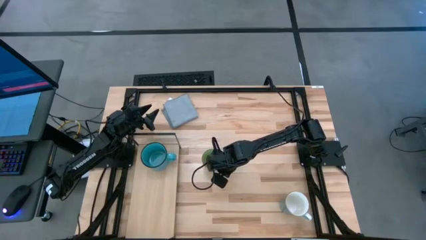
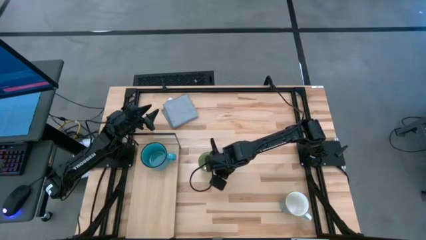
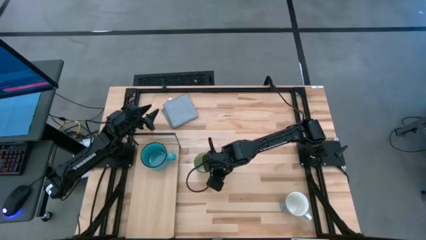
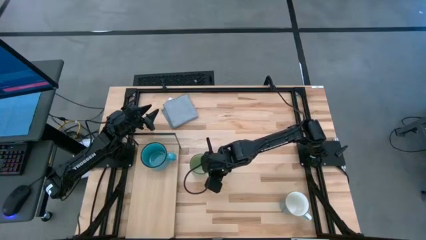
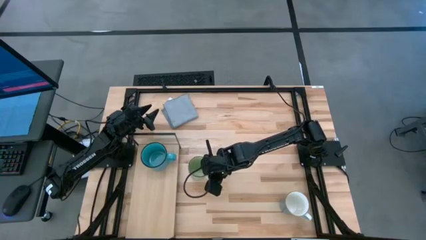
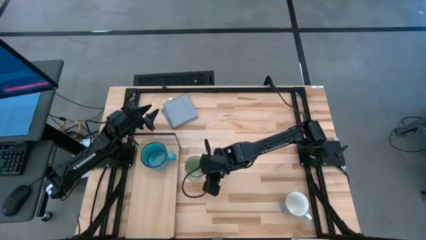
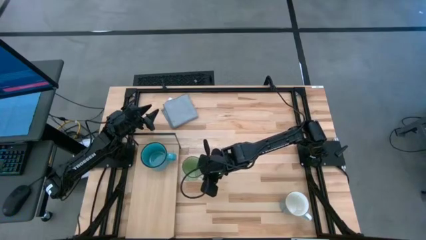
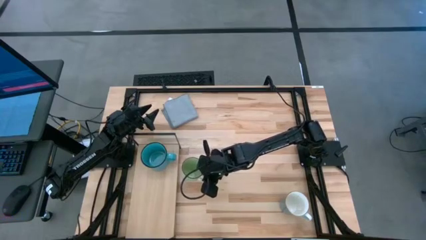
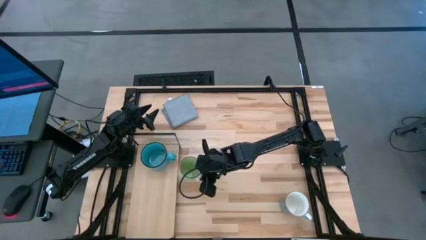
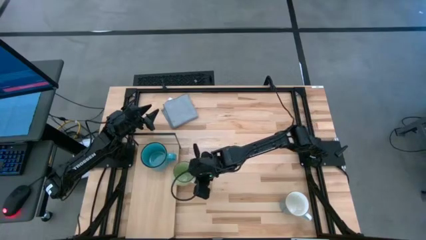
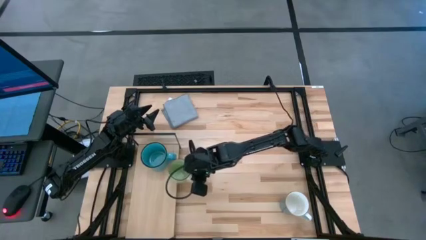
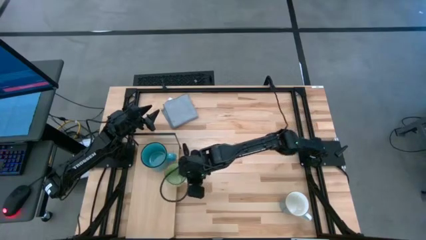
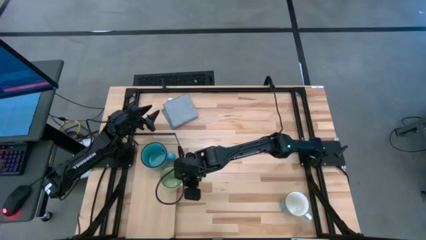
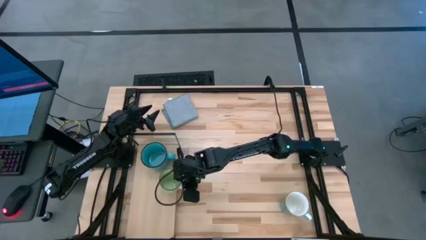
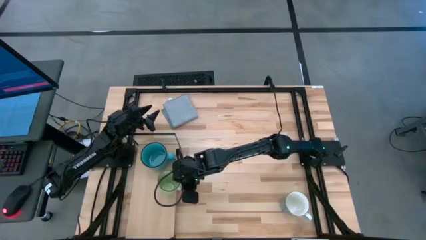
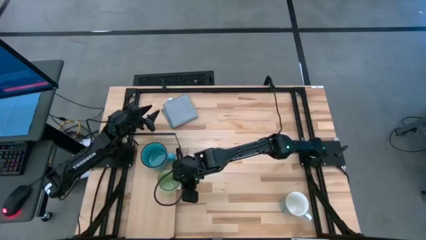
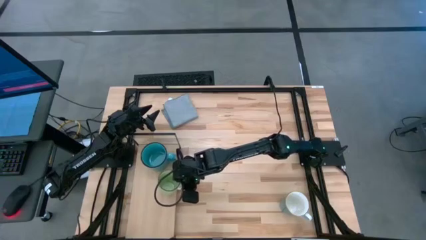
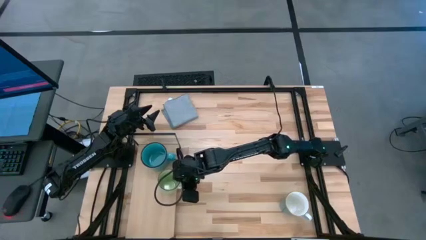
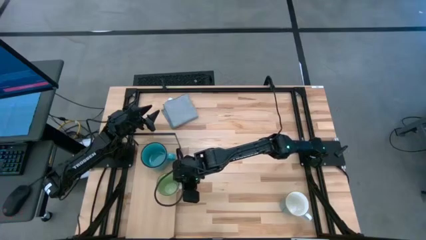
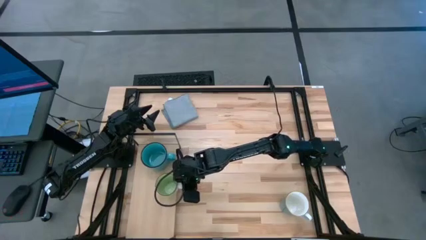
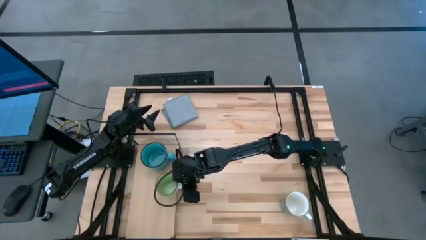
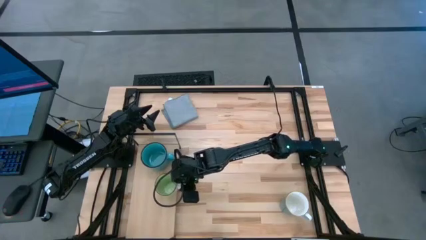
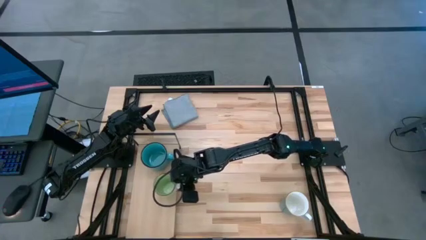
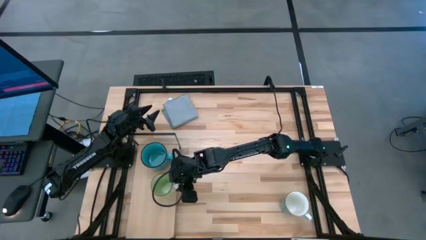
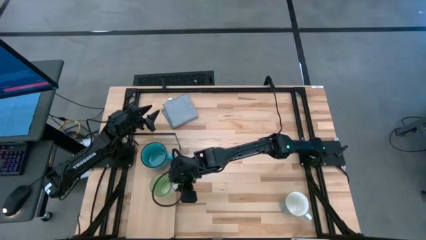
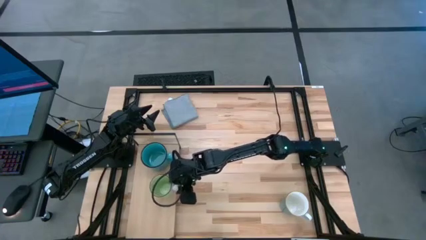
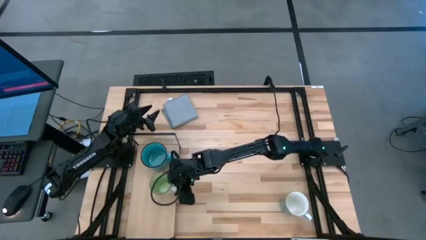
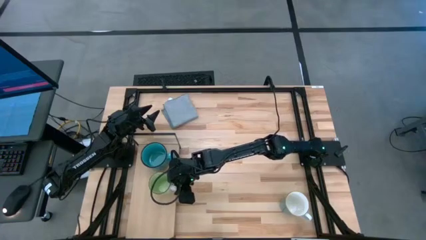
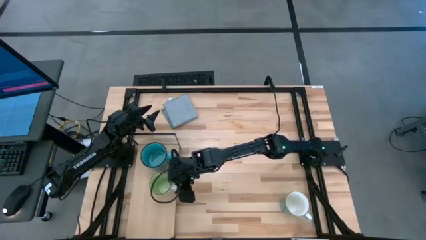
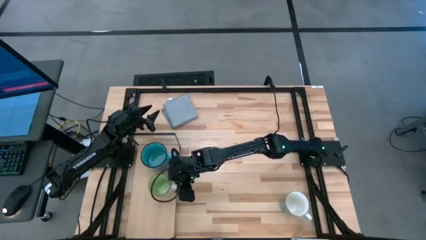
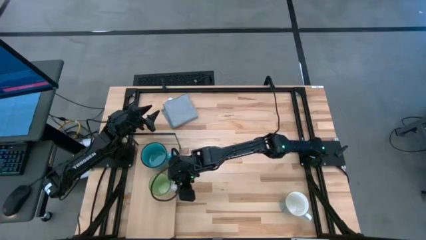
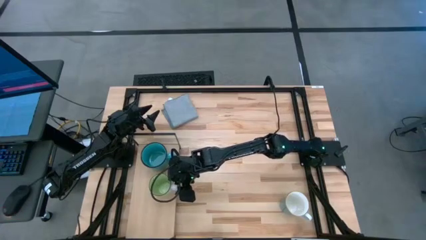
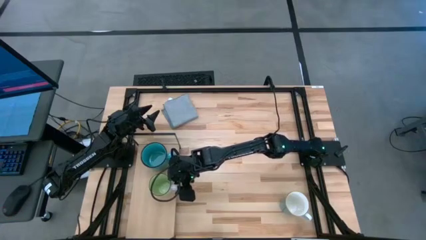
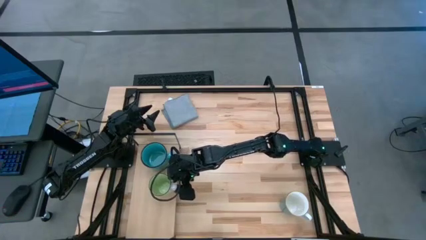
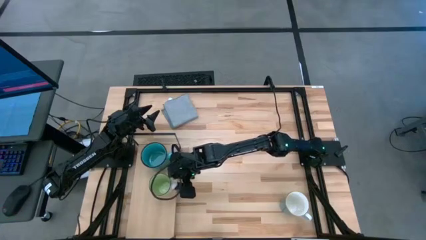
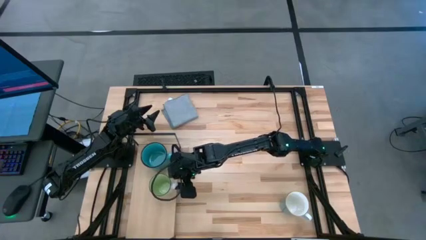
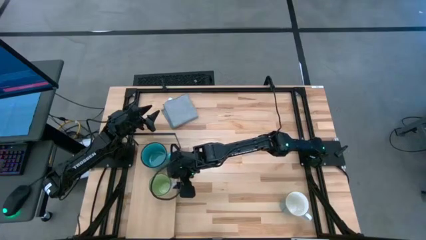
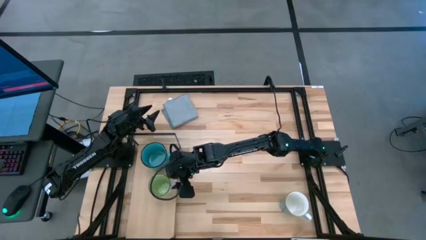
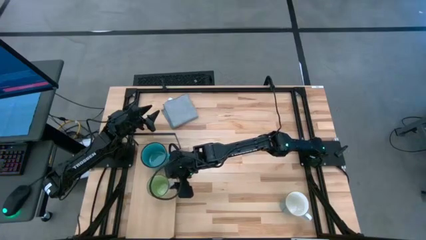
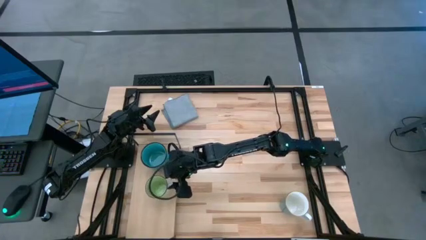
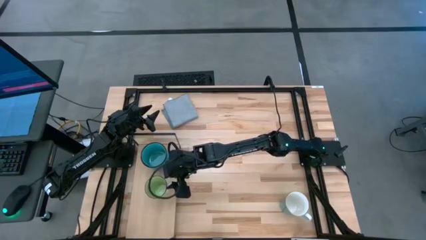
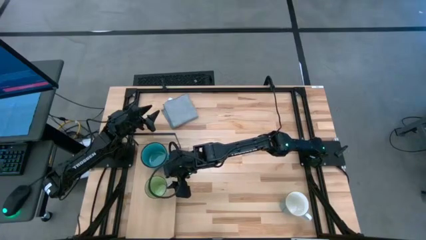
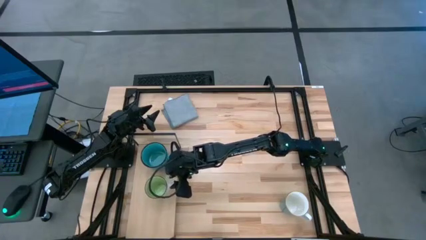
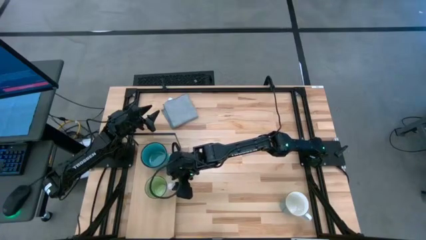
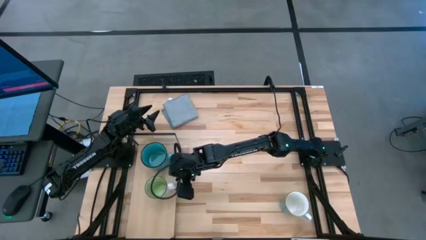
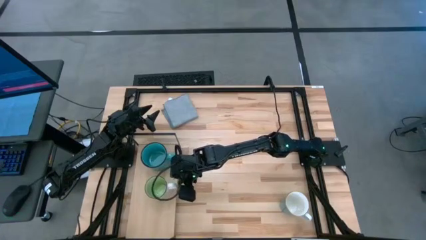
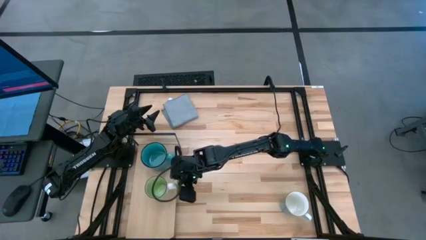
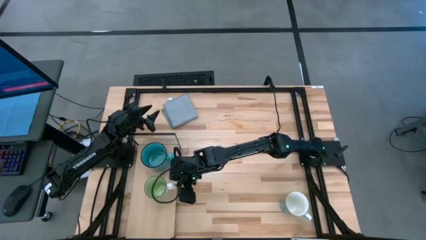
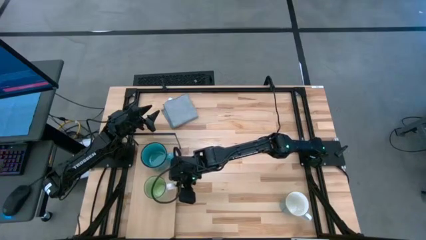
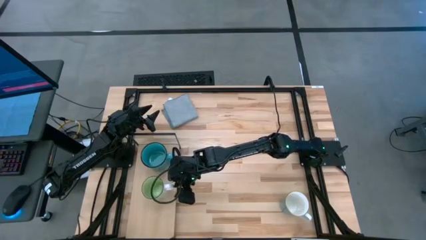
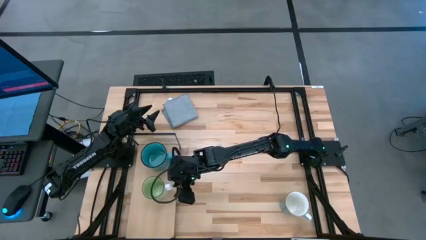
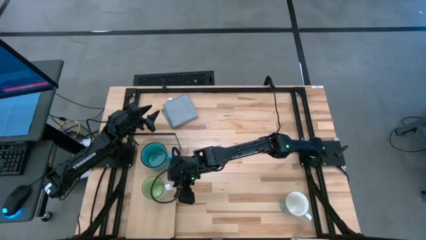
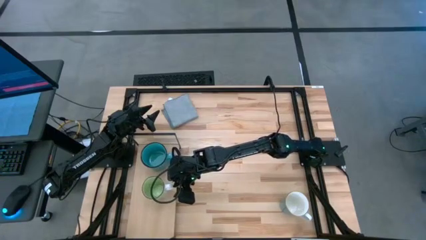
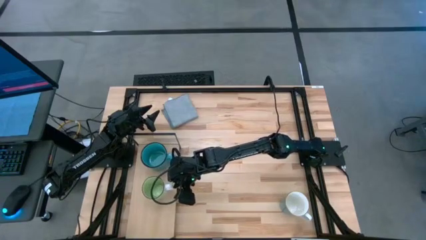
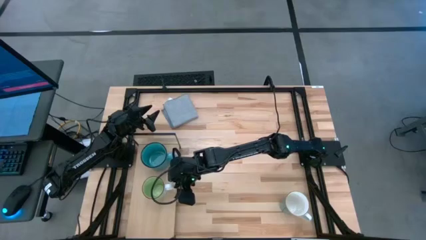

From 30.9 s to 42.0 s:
Task: Stack small to large cups/mugs on shelf
Put the green mug on the shelf
